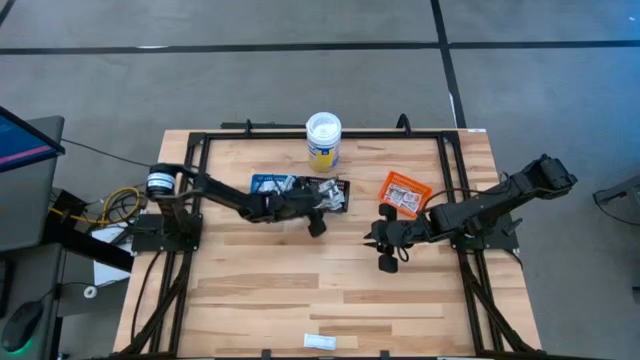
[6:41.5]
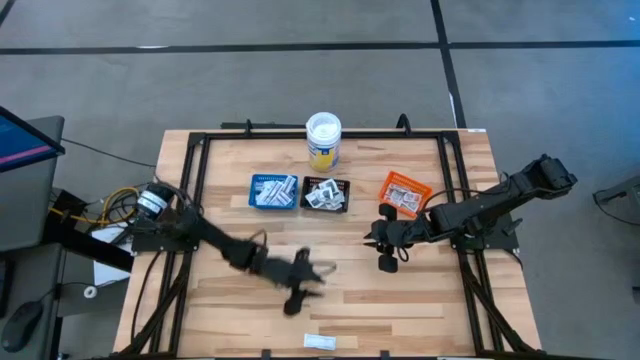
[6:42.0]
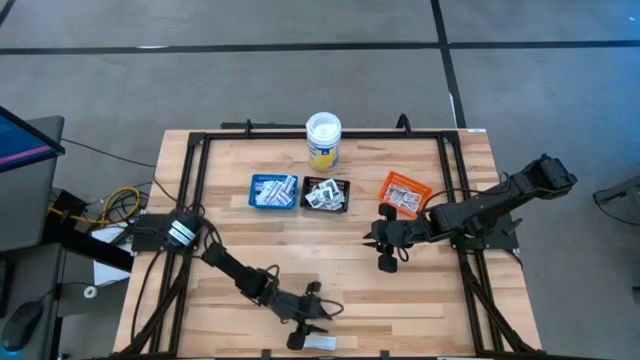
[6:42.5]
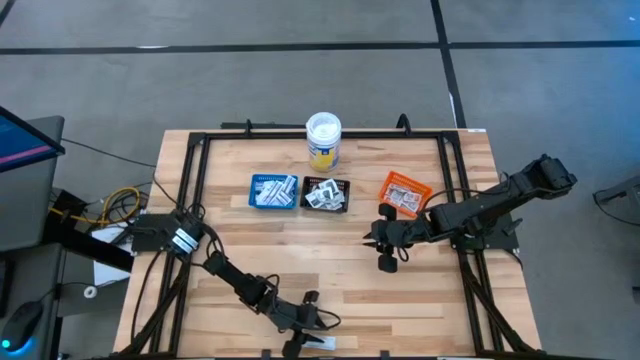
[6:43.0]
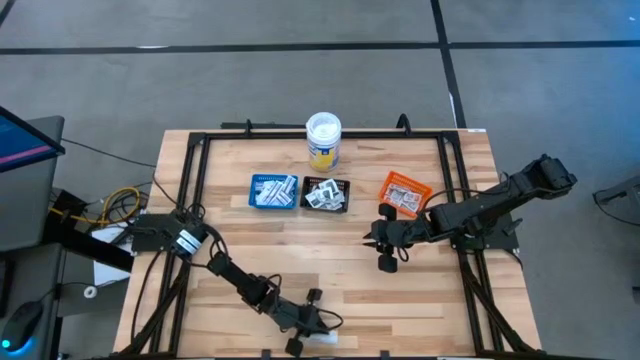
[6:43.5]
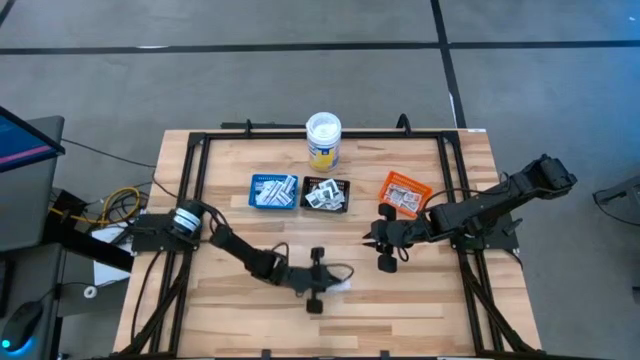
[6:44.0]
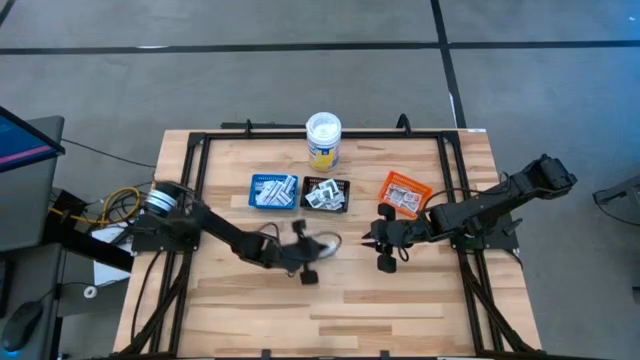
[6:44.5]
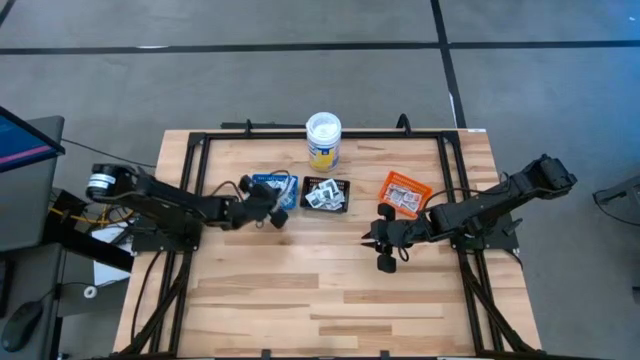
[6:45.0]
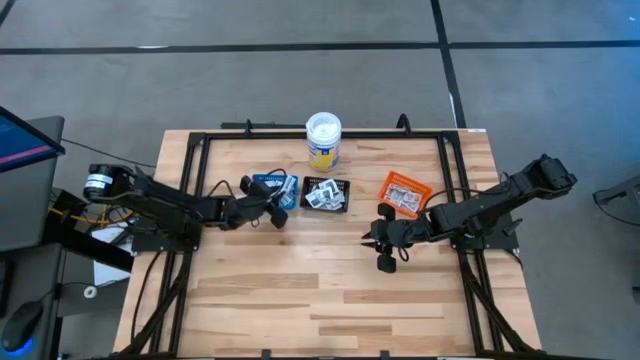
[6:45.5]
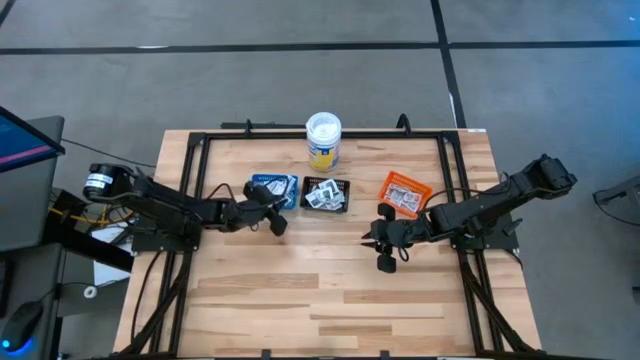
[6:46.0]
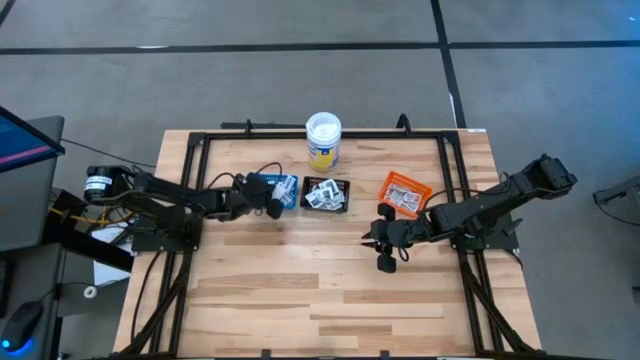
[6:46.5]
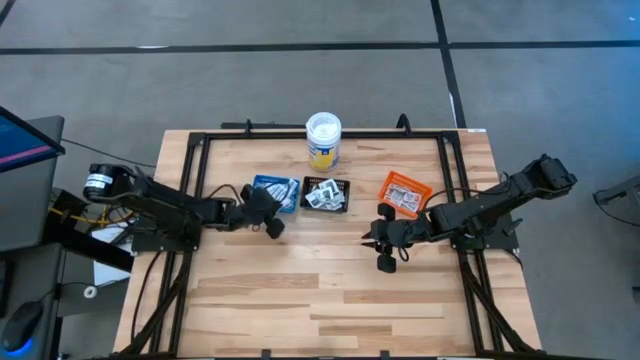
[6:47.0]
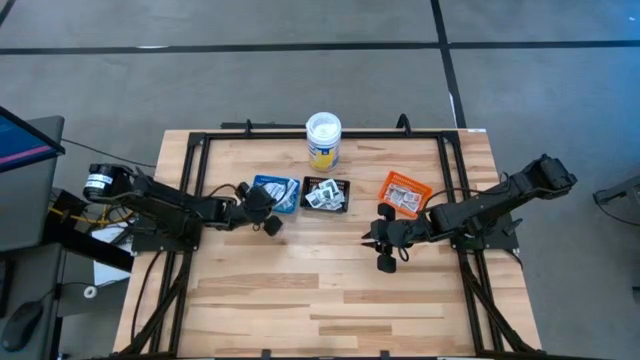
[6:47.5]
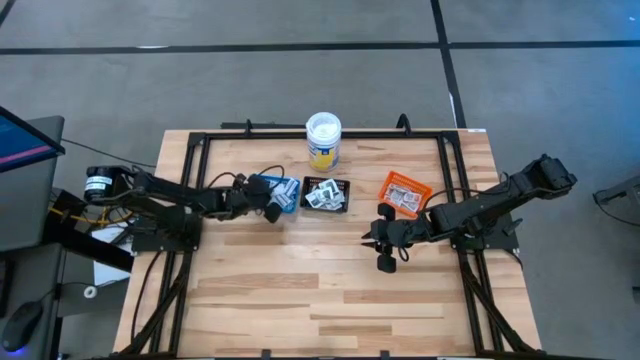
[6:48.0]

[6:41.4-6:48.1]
Task: Pick & Place First Aid Supplies
Put the blue bandage into the blue bin

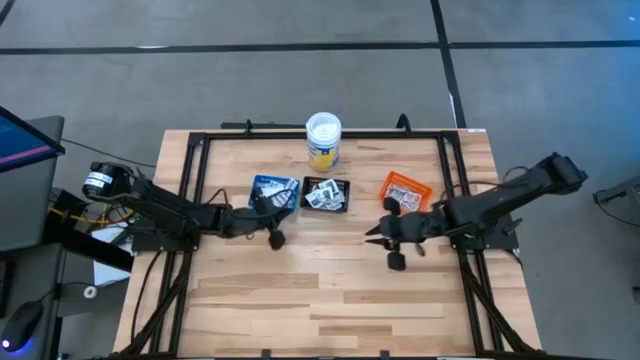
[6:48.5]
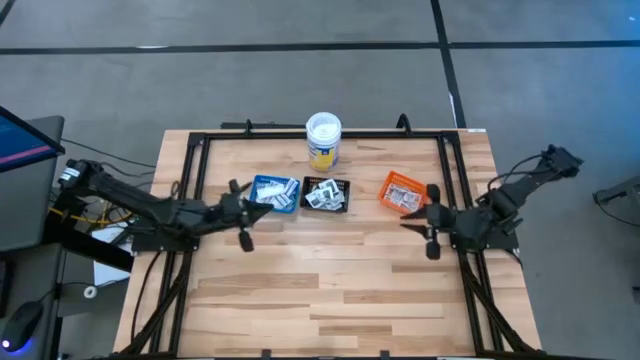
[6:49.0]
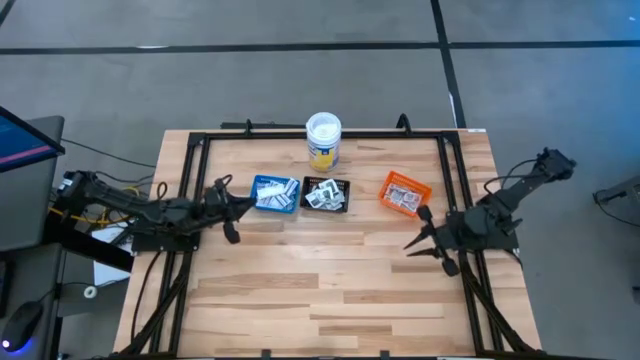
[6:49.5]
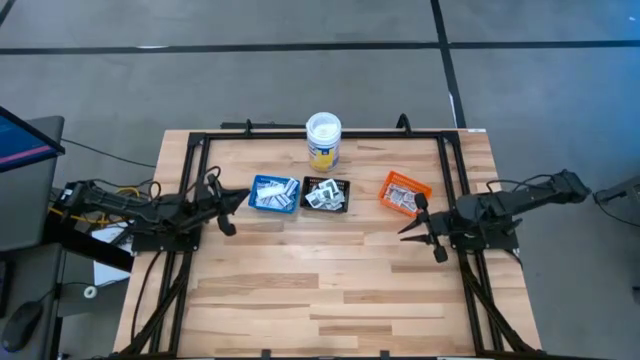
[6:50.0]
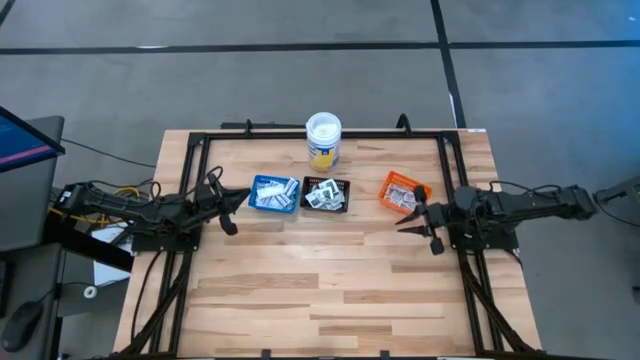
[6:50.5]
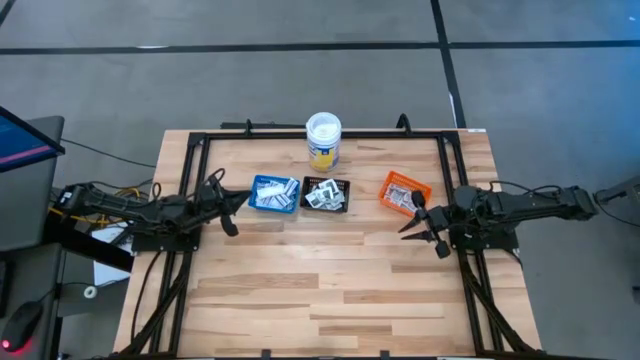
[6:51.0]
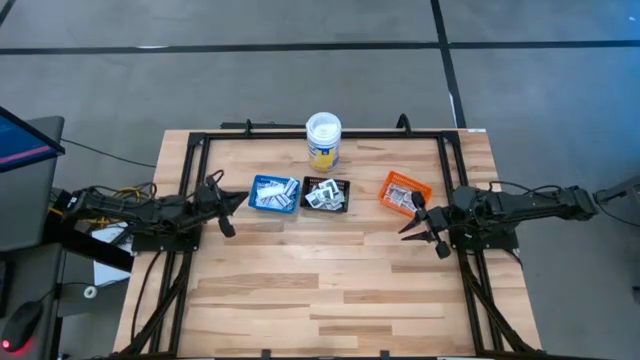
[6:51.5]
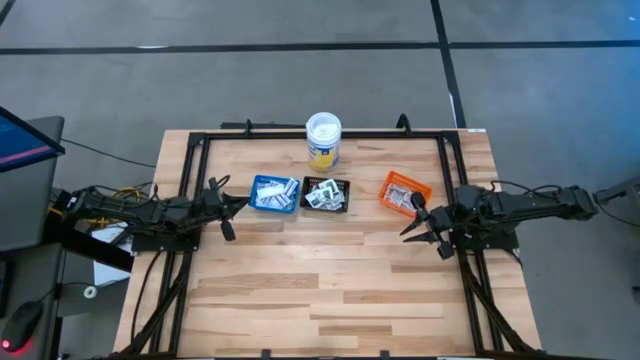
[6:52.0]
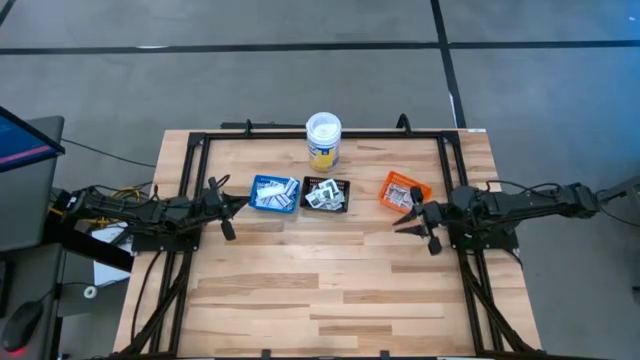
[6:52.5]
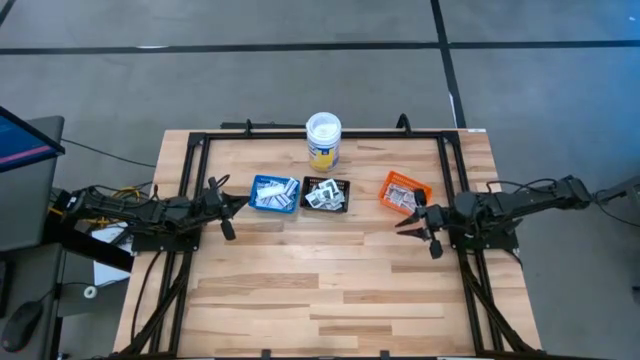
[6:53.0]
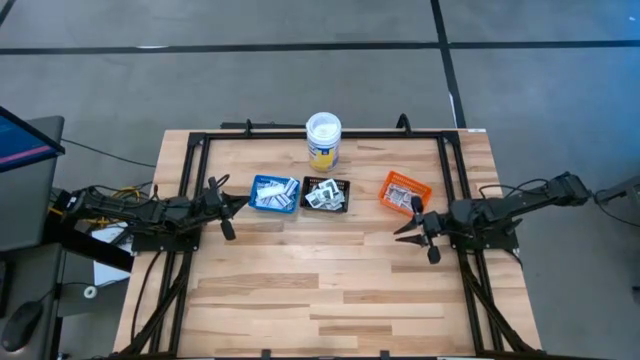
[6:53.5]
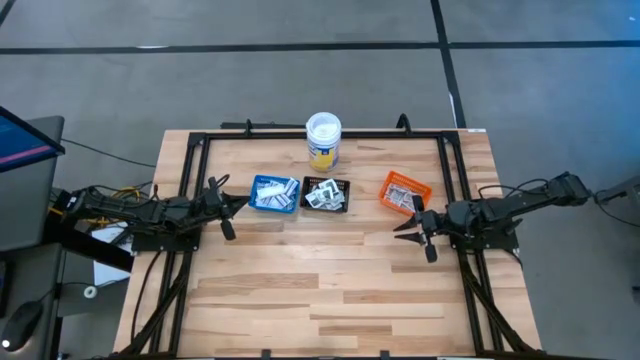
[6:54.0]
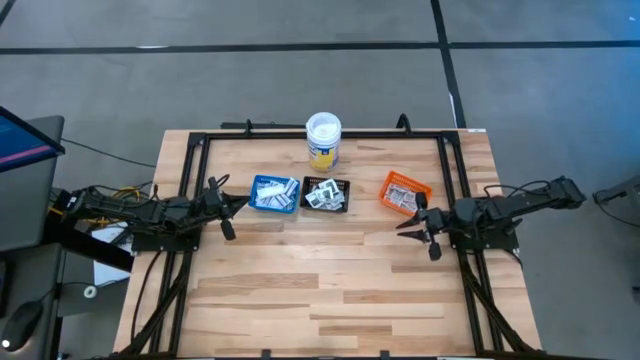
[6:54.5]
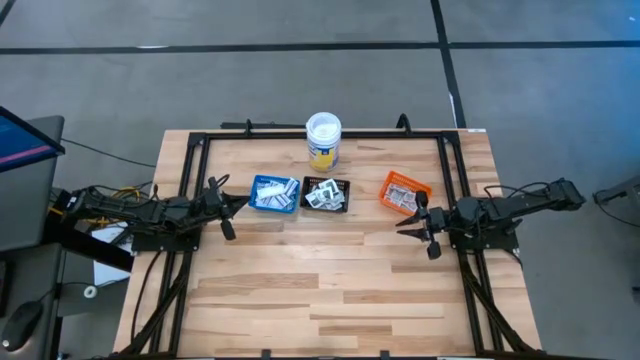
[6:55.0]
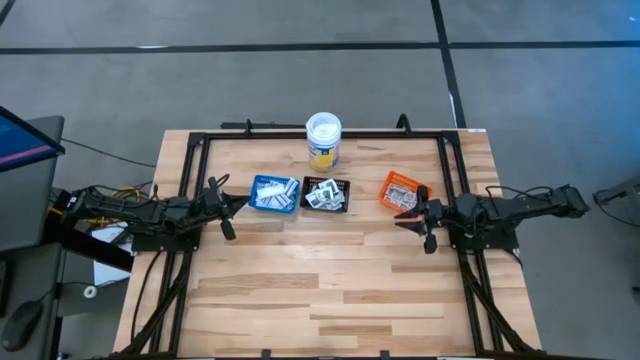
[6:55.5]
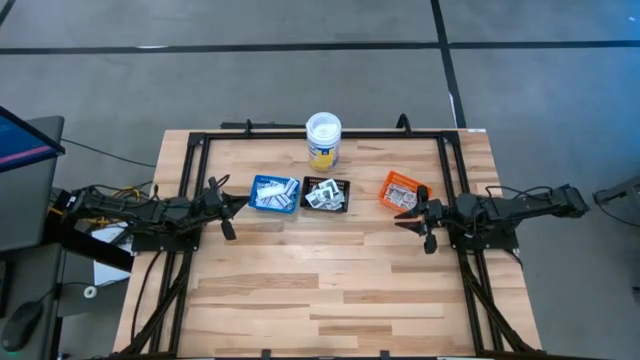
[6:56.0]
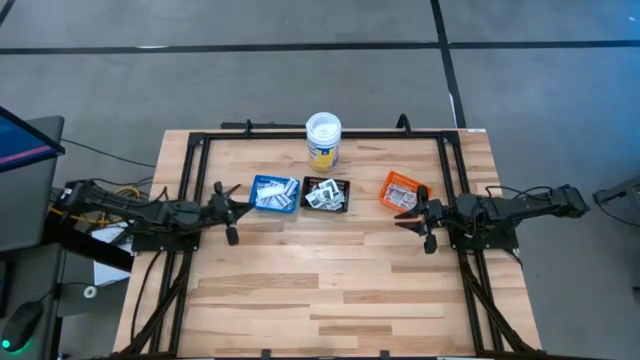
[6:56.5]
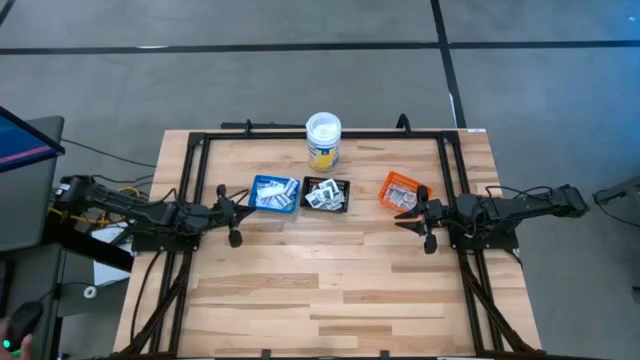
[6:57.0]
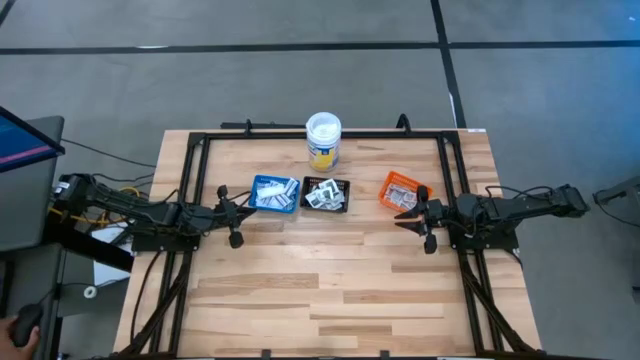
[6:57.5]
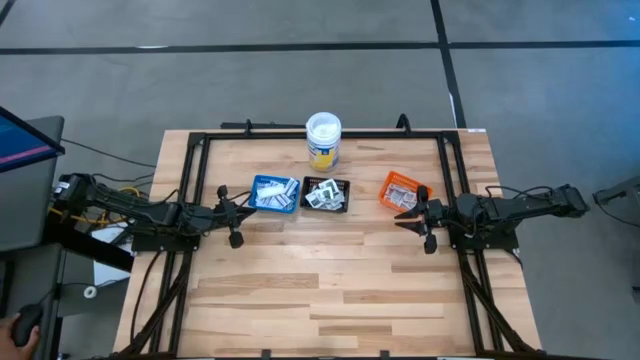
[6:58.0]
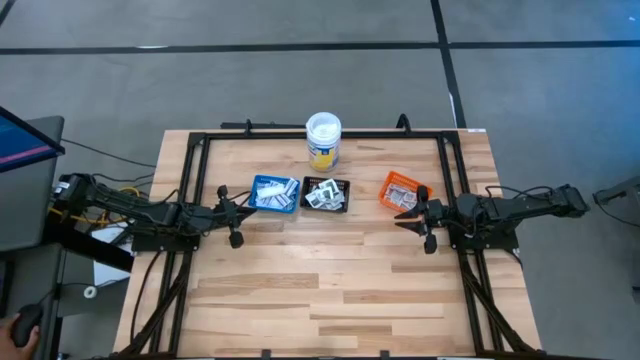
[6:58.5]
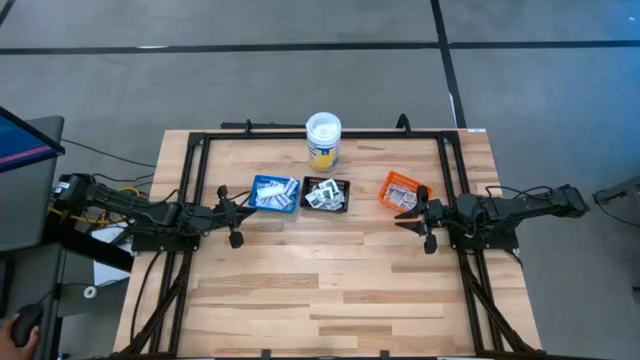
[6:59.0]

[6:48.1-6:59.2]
Return to Home Position

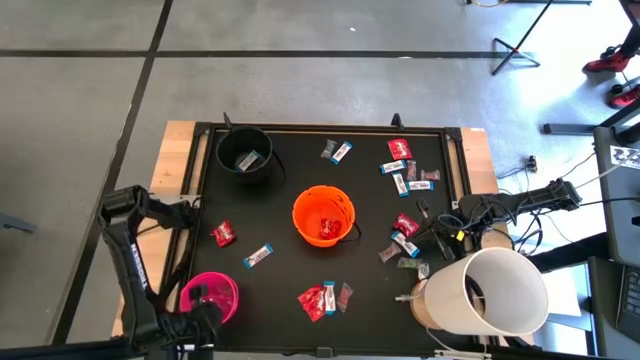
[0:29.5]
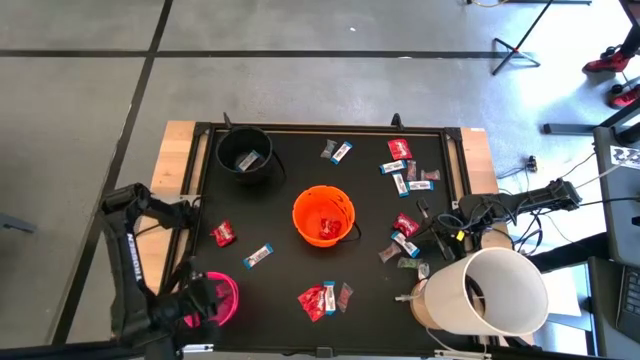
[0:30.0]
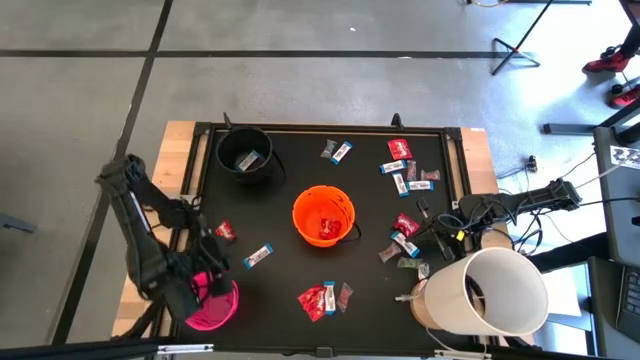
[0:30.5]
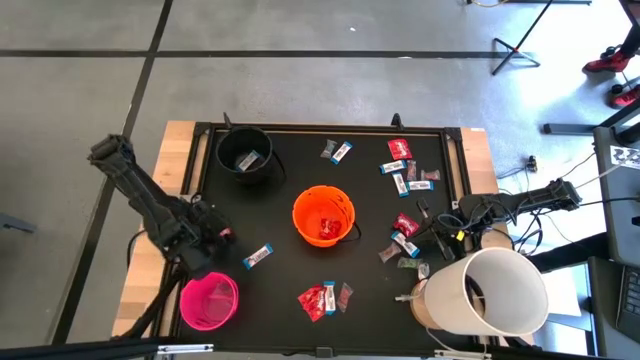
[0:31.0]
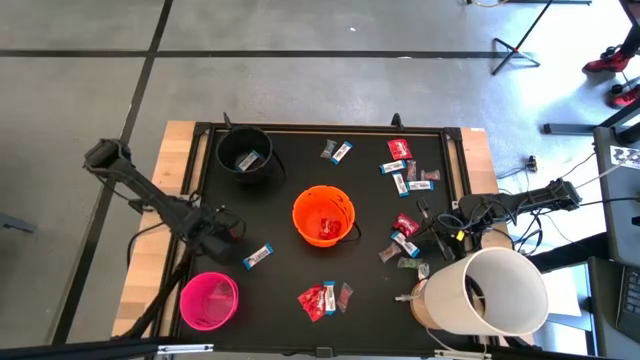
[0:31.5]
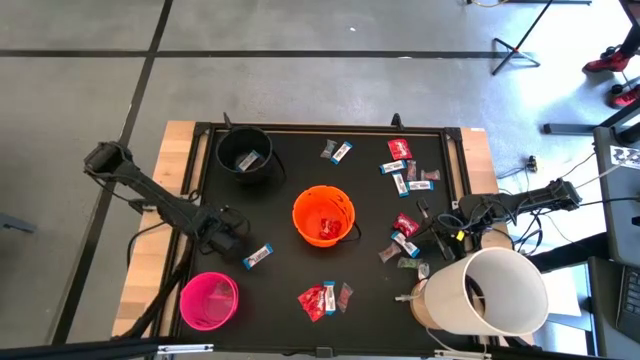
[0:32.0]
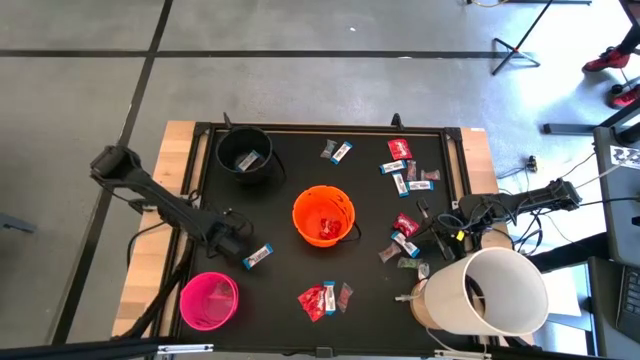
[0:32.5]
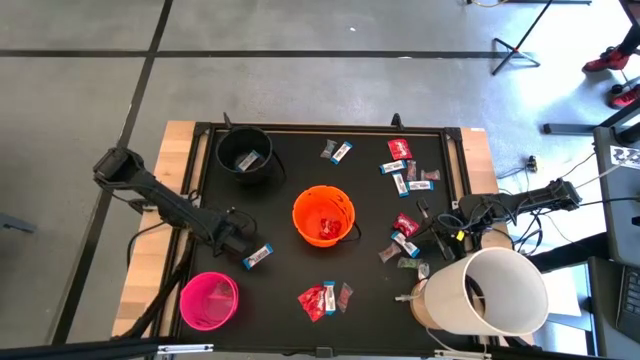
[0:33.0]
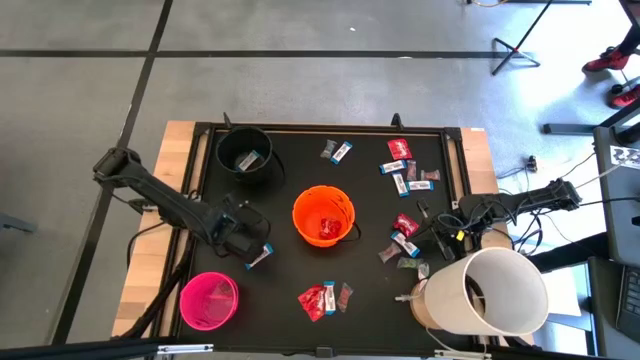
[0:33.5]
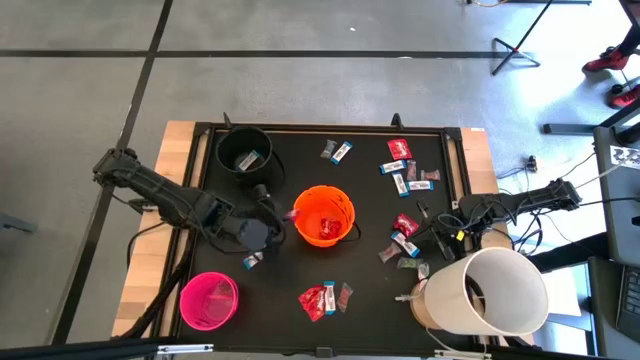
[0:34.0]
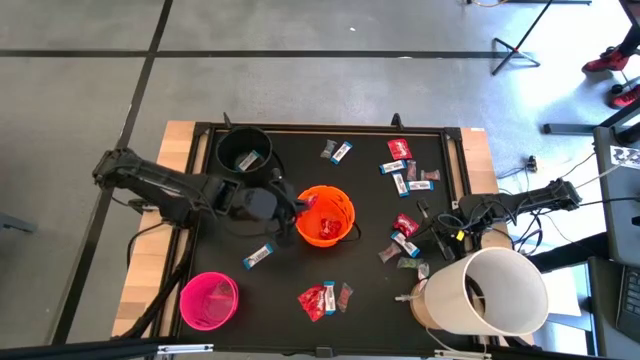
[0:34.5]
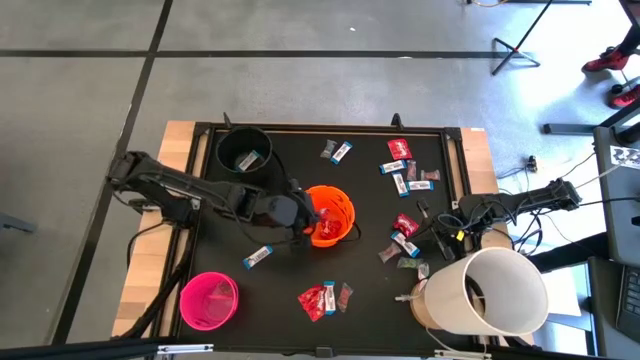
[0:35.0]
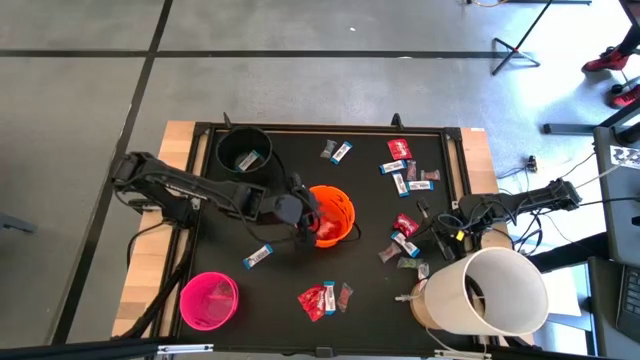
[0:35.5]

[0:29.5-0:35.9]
Task: Sort candy
Put the red candy into the orange bucket
